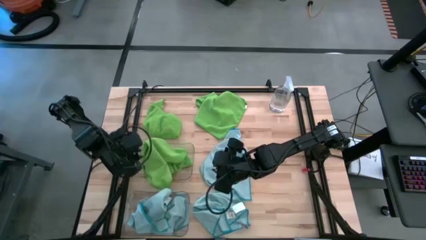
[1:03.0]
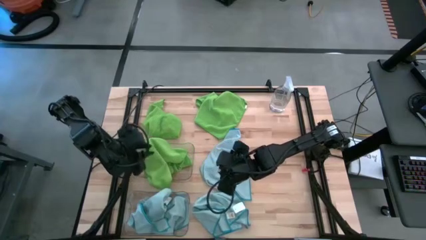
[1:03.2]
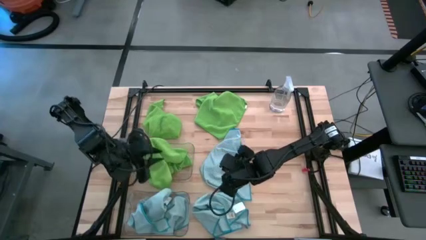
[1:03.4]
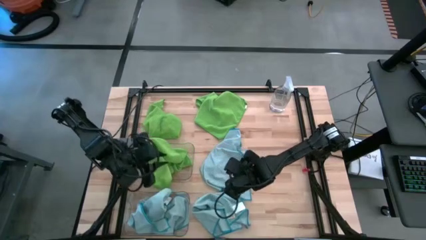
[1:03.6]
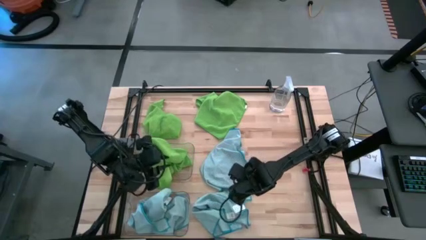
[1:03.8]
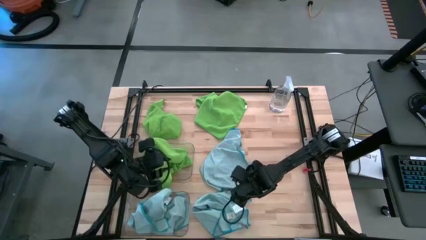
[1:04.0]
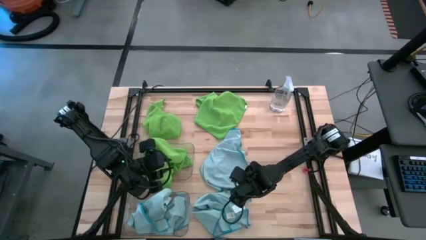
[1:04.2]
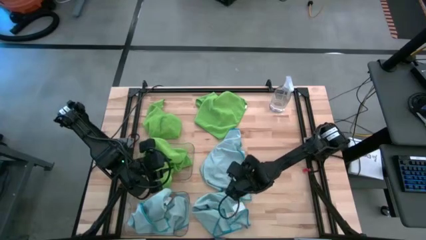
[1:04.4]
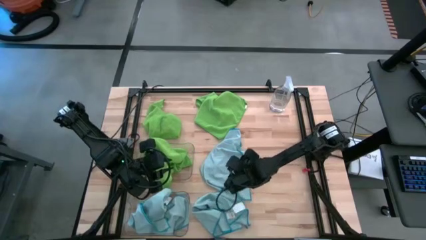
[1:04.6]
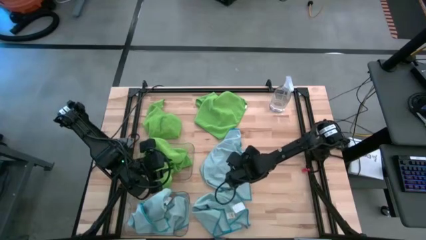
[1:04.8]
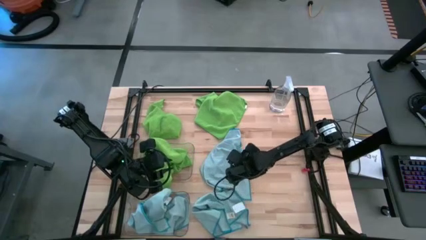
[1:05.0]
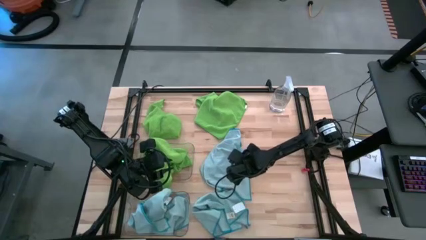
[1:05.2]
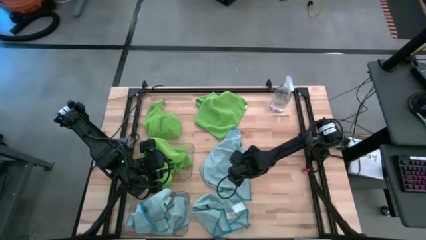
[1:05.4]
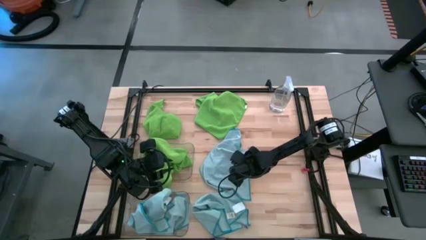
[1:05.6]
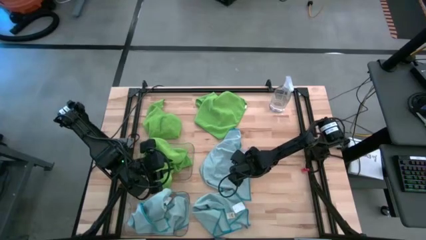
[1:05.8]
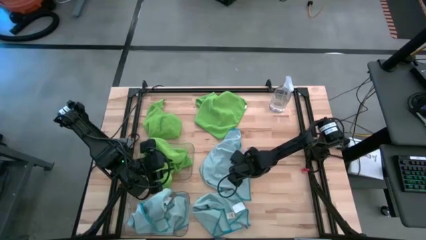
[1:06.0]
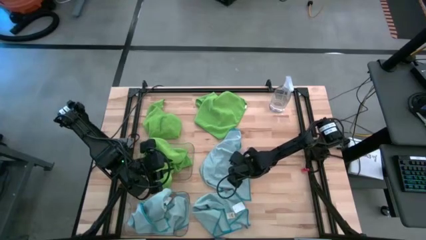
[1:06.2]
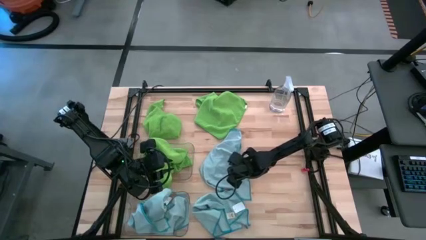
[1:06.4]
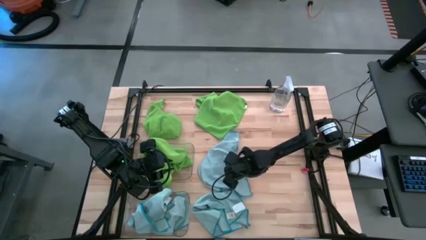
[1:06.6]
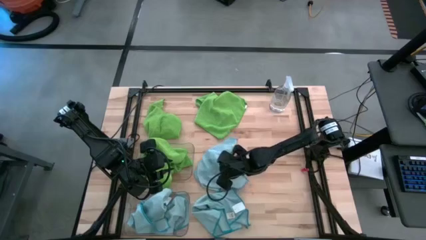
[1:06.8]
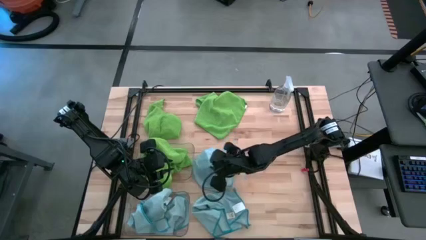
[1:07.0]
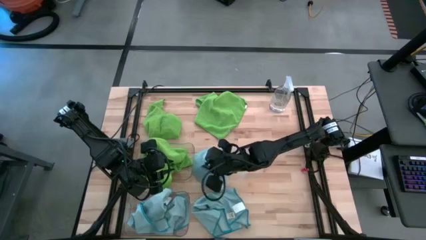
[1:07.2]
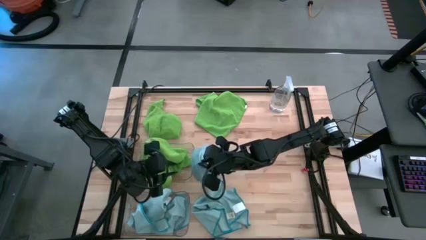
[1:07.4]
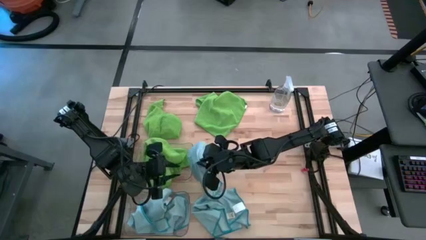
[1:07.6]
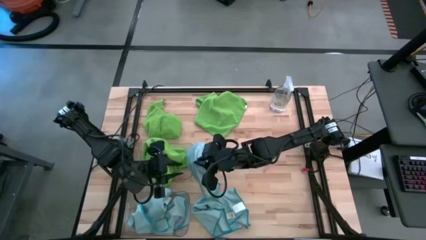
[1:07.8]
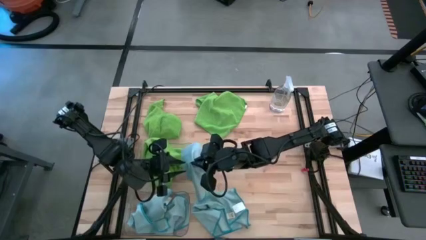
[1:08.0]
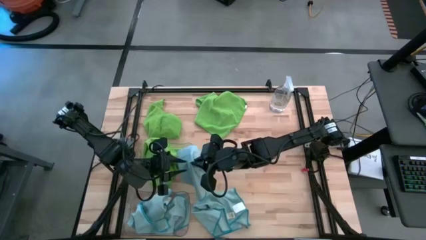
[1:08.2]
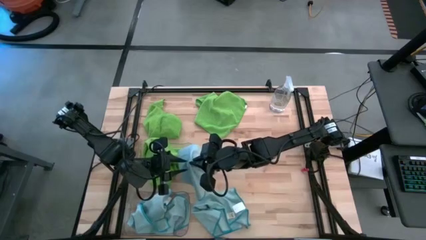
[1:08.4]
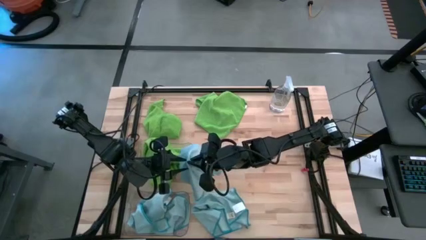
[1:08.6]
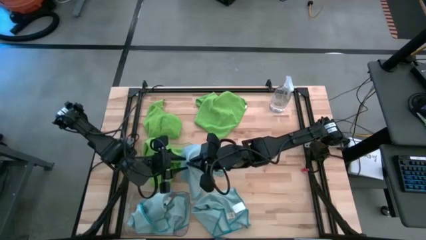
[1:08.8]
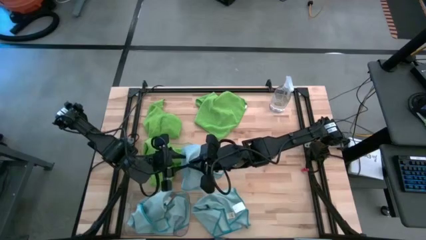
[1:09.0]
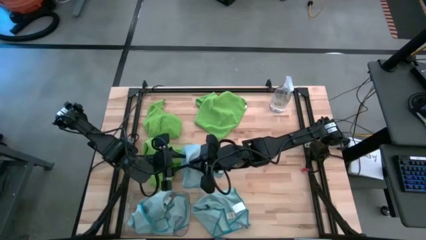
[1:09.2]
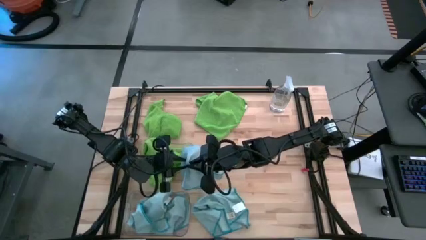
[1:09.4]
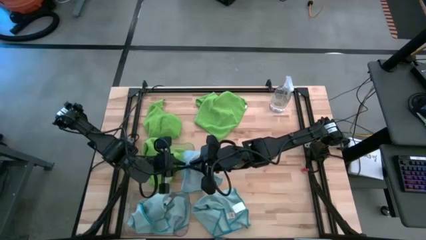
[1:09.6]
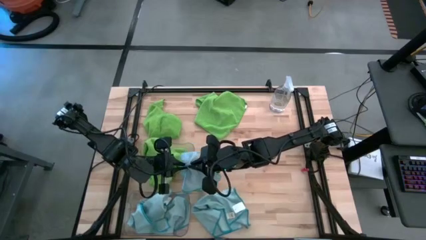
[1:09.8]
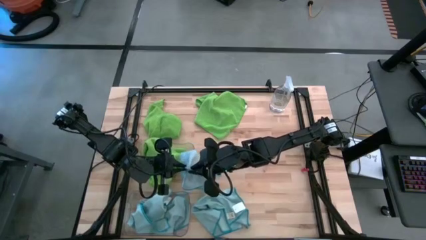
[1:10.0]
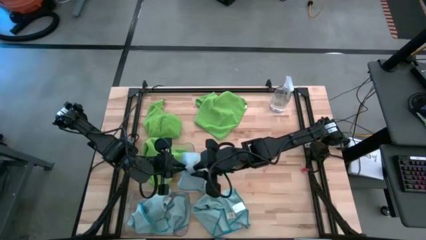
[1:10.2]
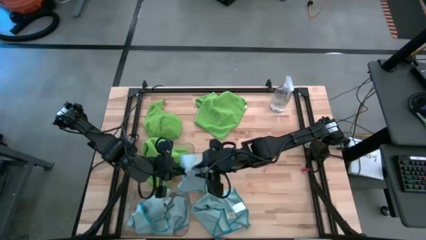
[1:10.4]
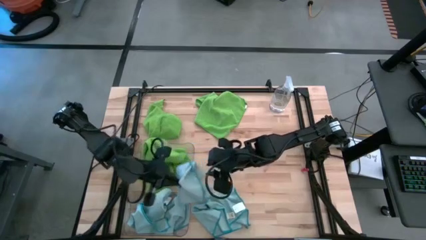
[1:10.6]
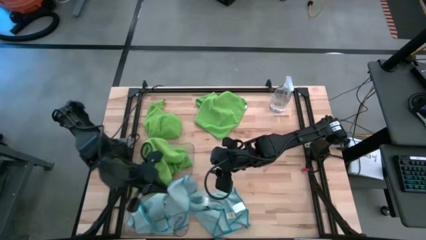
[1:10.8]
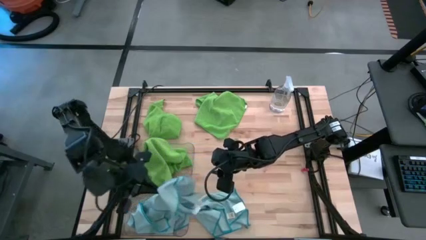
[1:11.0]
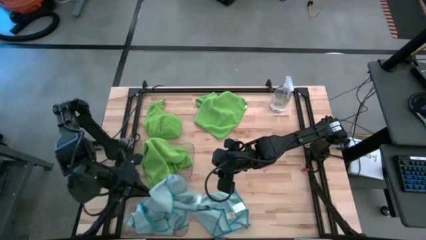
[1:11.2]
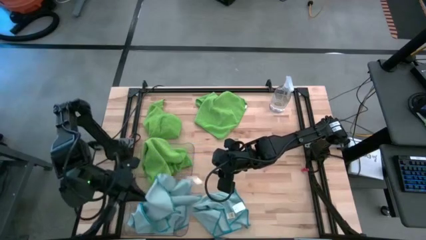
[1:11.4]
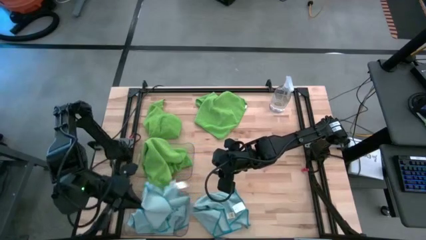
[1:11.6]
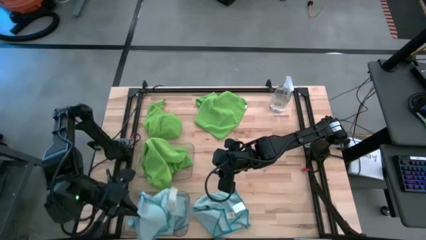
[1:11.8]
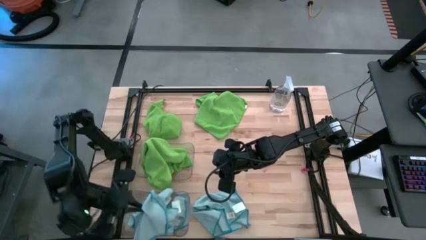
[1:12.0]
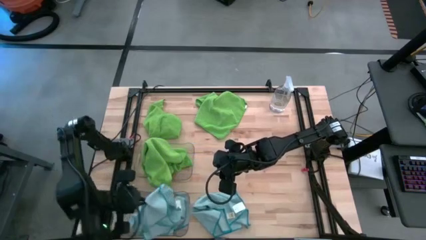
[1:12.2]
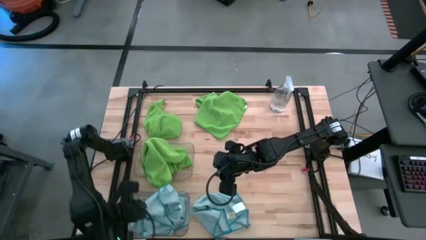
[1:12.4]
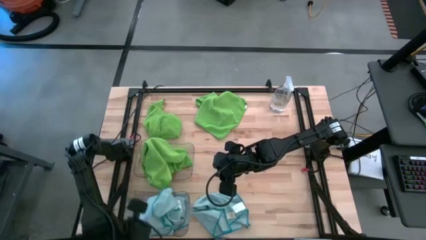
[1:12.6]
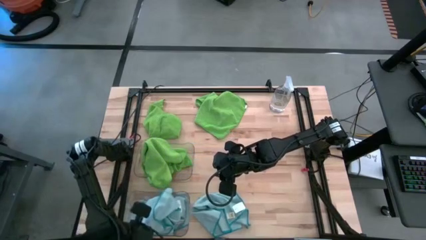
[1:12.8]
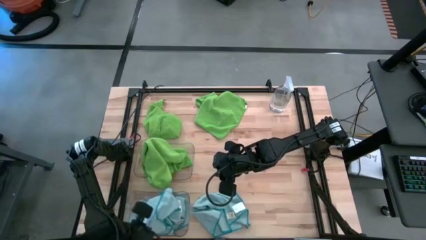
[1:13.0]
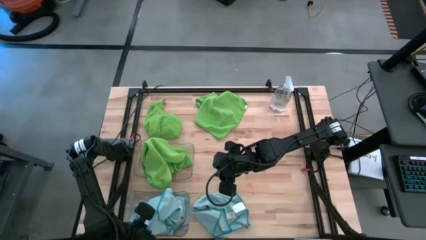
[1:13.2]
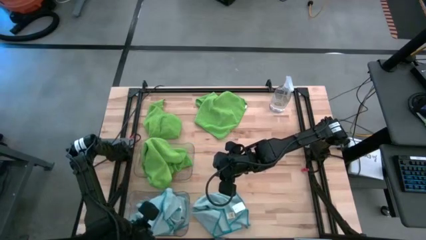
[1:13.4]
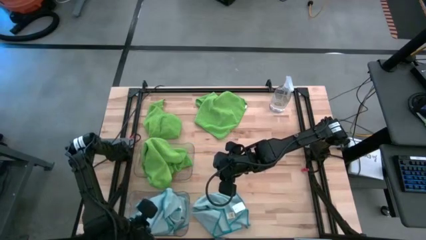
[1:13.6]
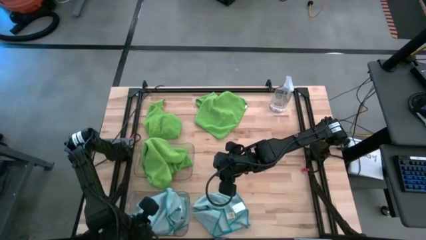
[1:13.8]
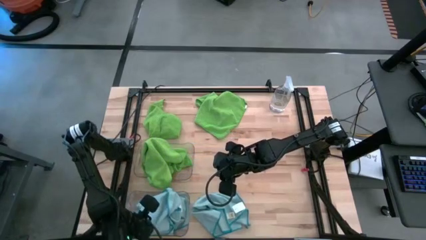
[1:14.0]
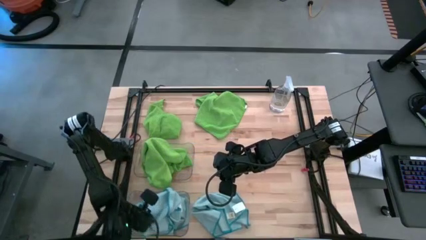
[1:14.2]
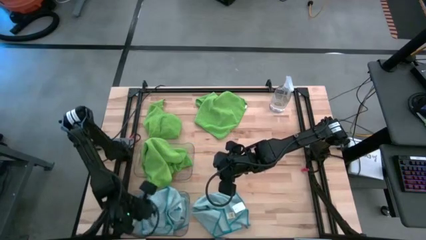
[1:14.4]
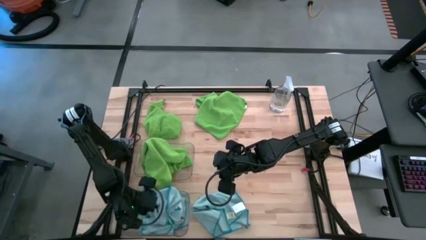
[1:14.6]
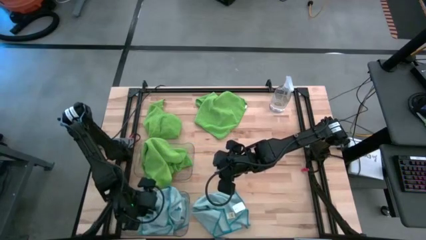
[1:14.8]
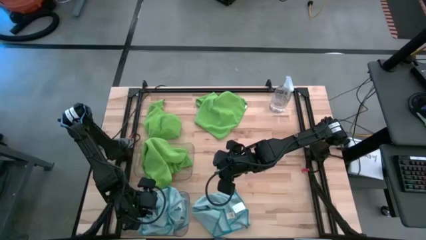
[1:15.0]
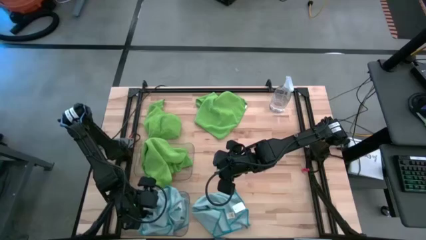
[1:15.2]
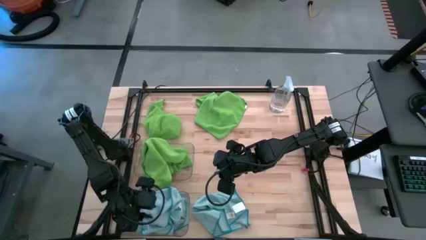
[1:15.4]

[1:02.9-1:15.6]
Task: Sort microfiber towel by color & place in baskets
Put the top blue microfiber cloth into the bottom transparent bin

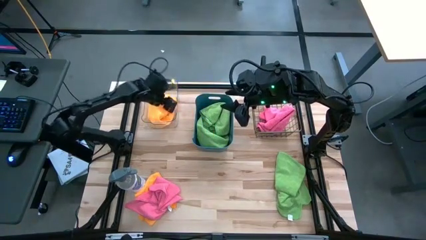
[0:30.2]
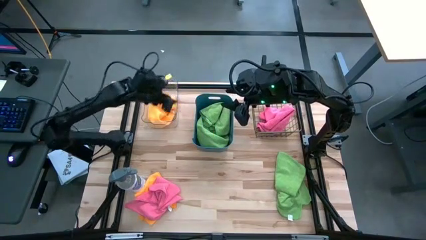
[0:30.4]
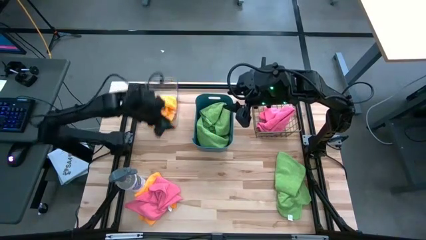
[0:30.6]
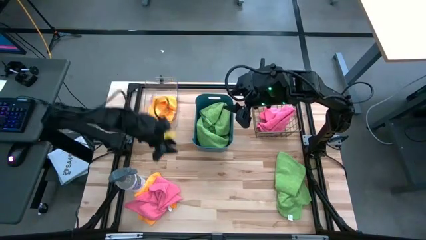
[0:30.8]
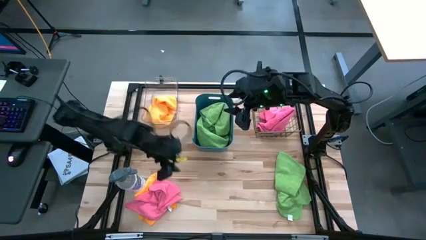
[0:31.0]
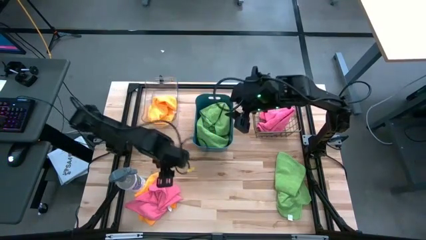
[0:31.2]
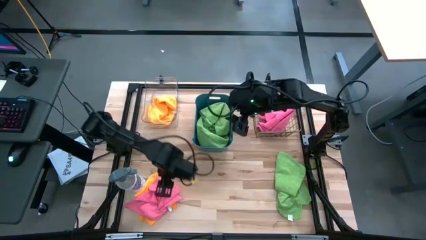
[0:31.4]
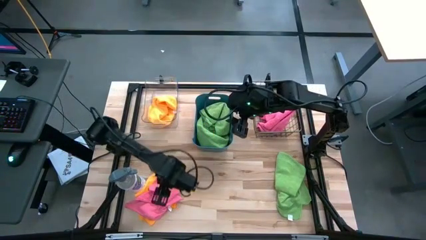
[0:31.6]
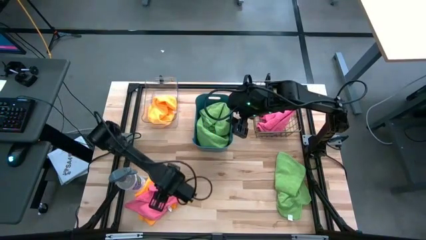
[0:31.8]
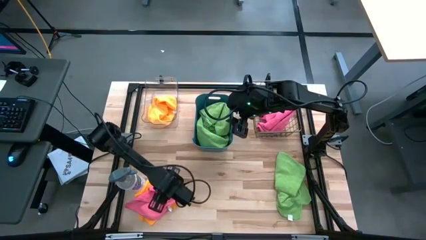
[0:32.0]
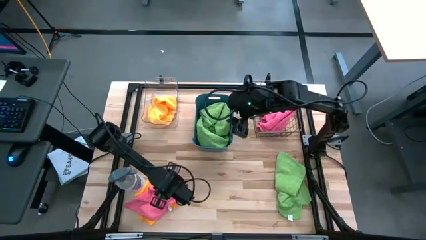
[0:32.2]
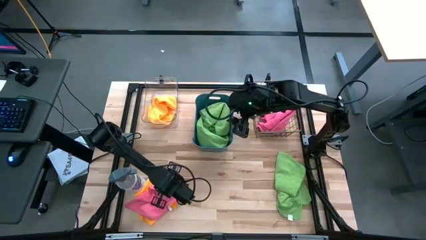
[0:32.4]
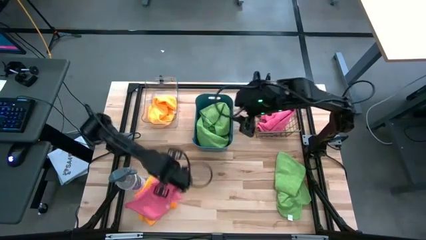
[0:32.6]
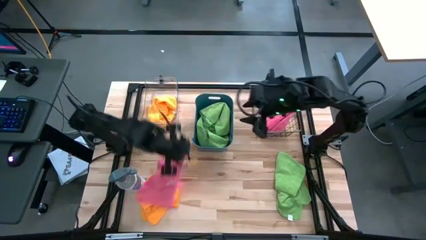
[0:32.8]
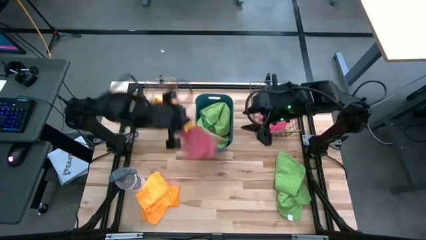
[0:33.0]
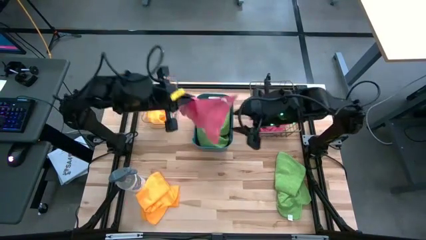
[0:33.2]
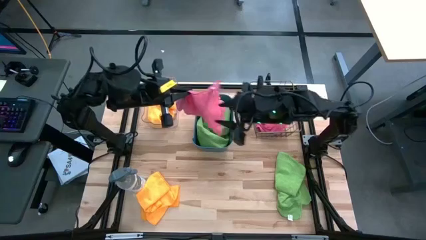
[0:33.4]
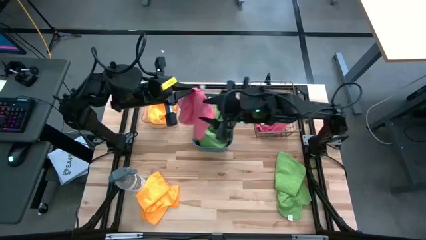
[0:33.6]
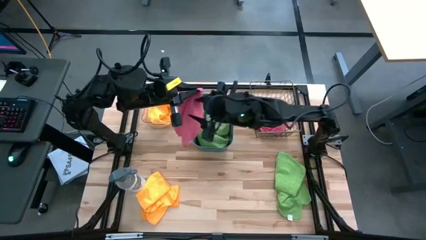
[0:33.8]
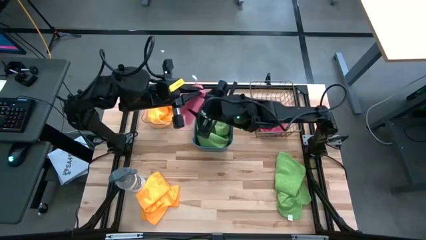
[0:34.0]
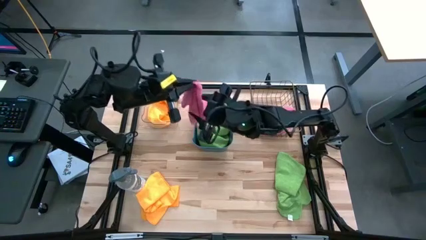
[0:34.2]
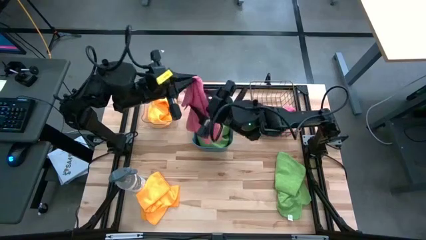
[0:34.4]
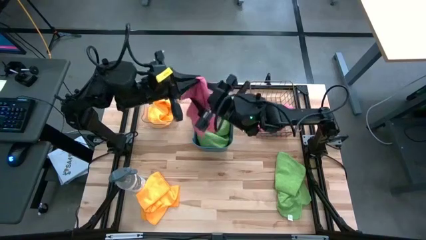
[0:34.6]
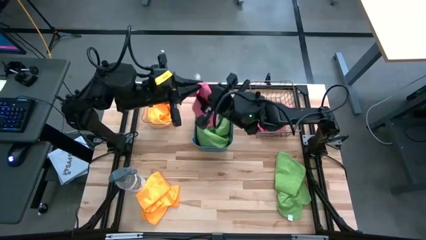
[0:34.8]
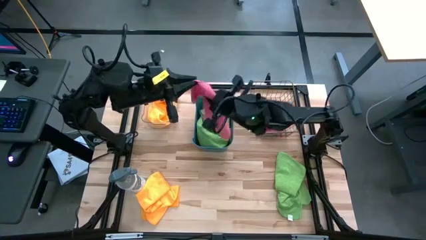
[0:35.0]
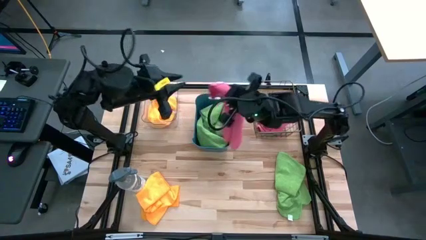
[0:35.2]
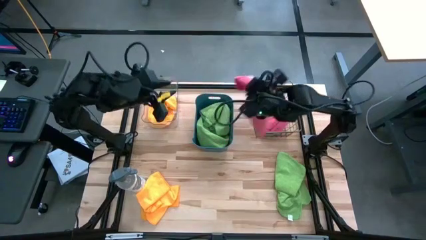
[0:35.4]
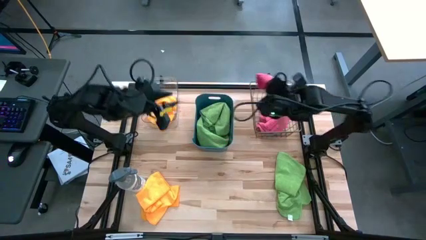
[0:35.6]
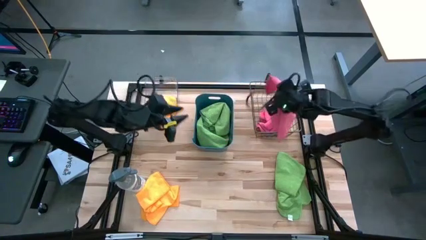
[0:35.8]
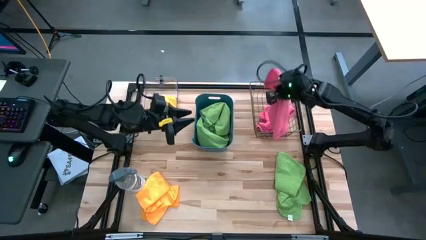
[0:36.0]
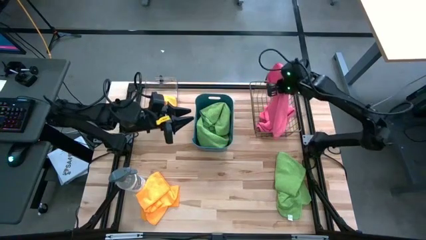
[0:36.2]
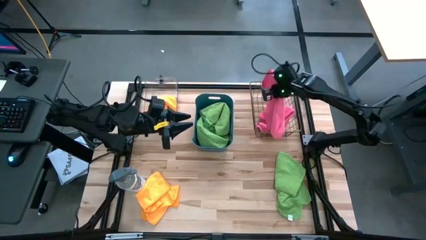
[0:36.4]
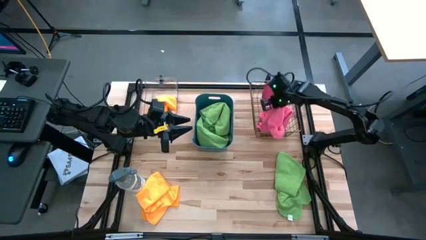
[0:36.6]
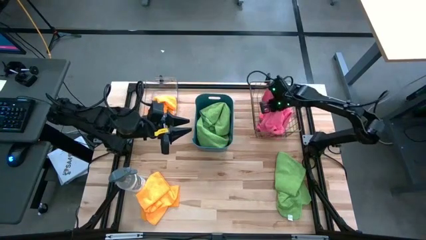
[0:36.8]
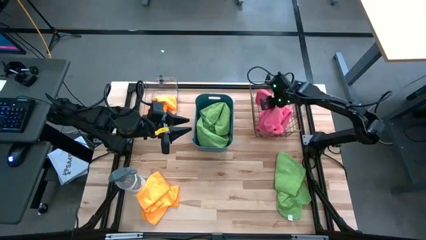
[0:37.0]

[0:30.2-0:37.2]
Task: Sort microfiber towel by color & place in baskets
Put the pink microfiber cloth into the wire basket
